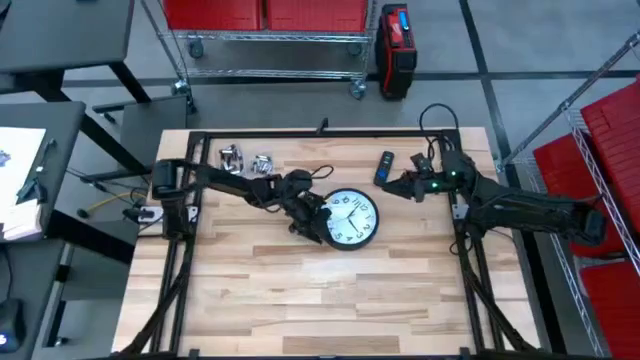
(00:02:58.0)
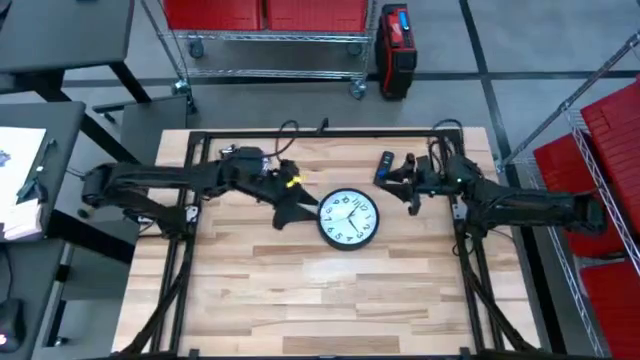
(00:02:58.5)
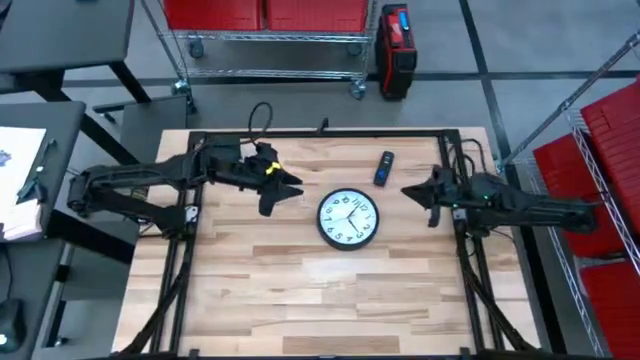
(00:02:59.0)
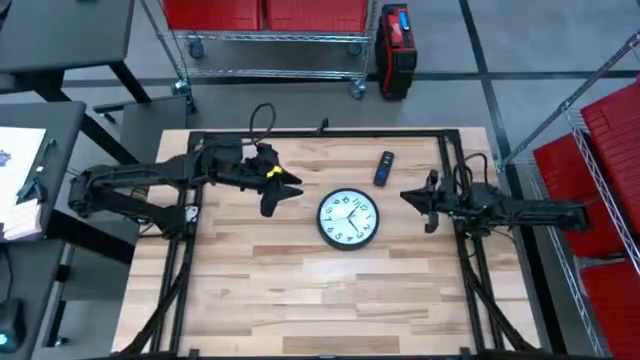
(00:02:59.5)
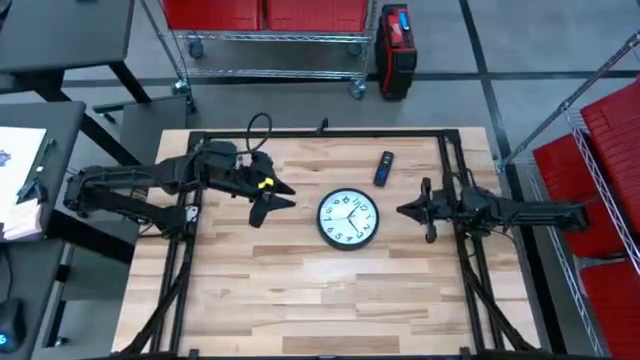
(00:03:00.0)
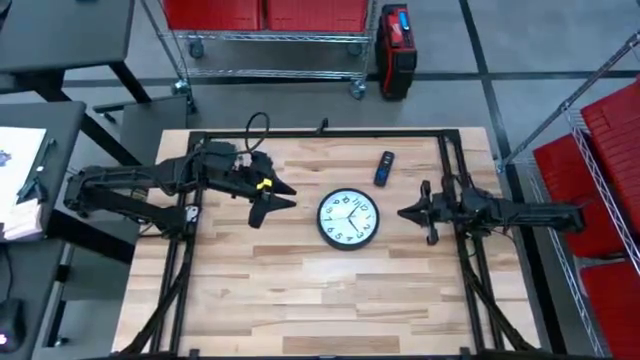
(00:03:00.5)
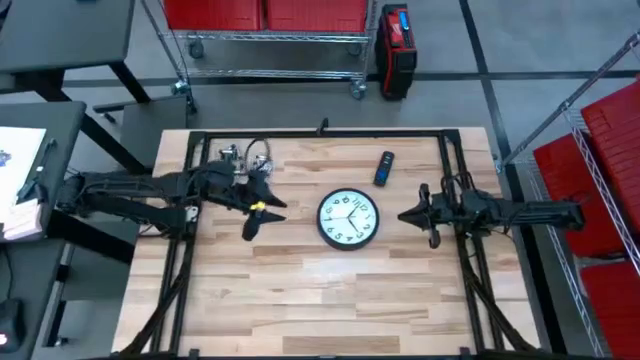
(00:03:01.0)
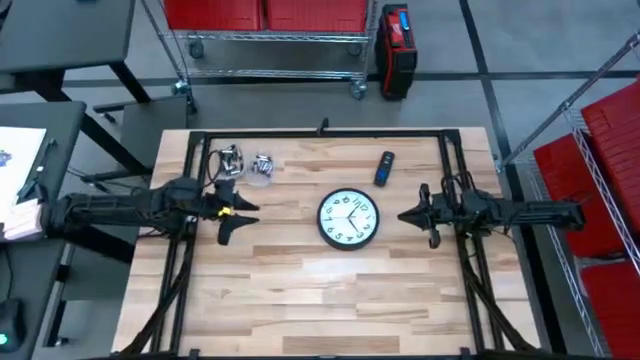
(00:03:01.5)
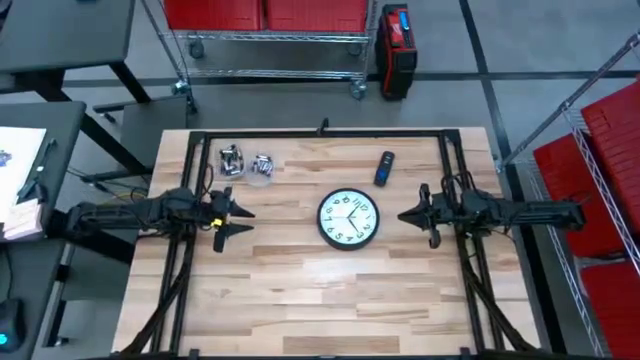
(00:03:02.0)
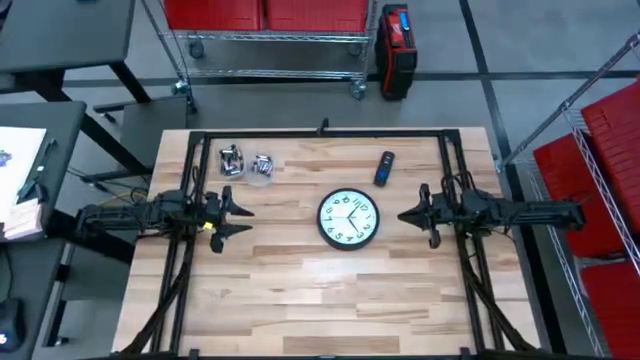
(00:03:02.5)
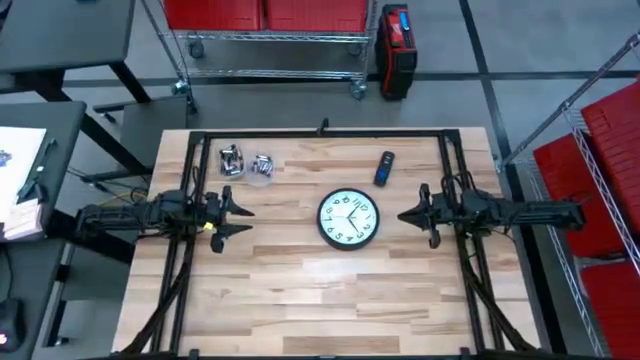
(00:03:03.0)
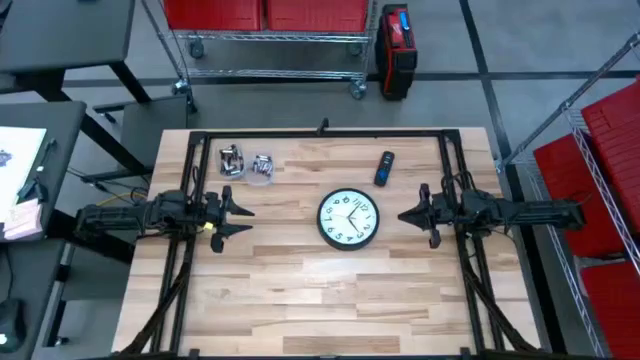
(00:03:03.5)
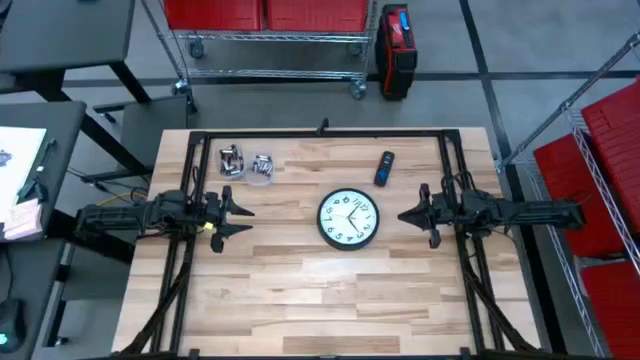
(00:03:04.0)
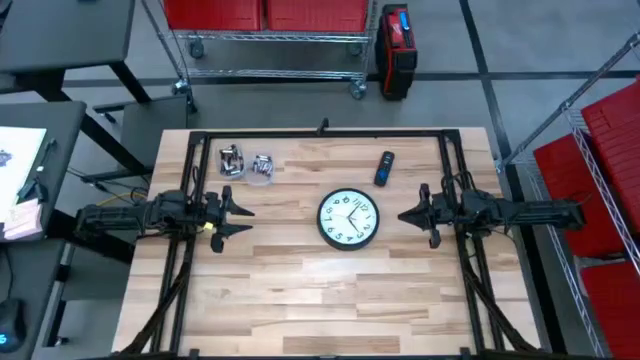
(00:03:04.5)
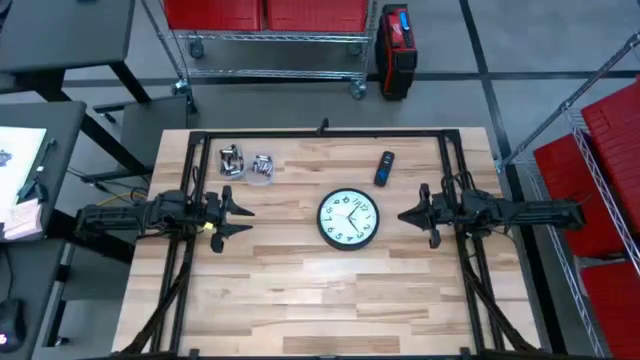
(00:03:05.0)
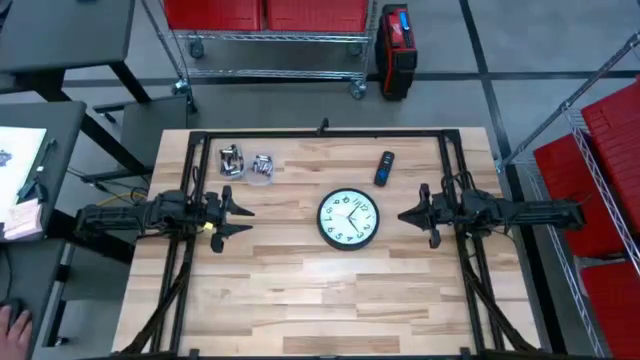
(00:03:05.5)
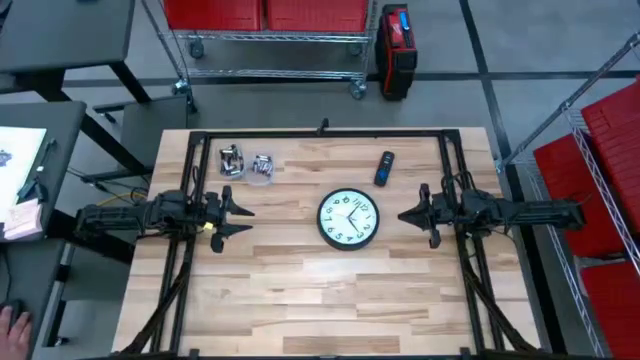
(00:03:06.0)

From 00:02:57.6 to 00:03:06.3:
Task: Insert battery
Return to Home Position

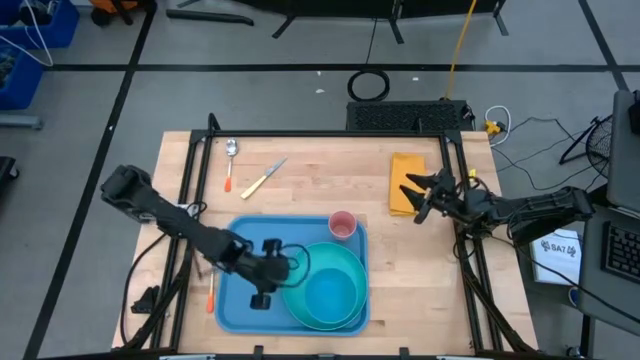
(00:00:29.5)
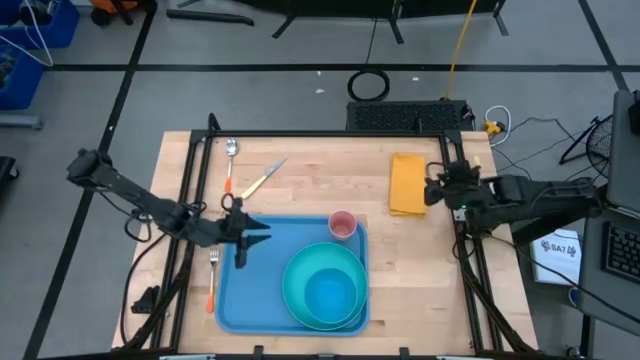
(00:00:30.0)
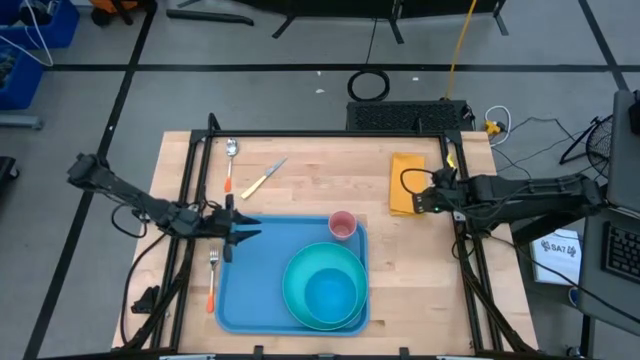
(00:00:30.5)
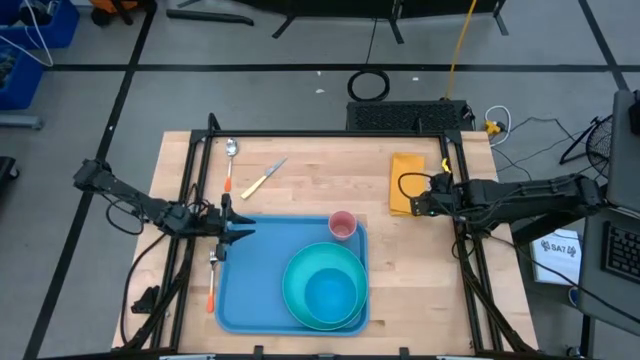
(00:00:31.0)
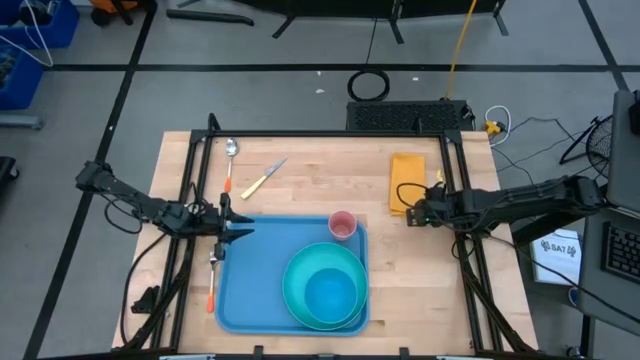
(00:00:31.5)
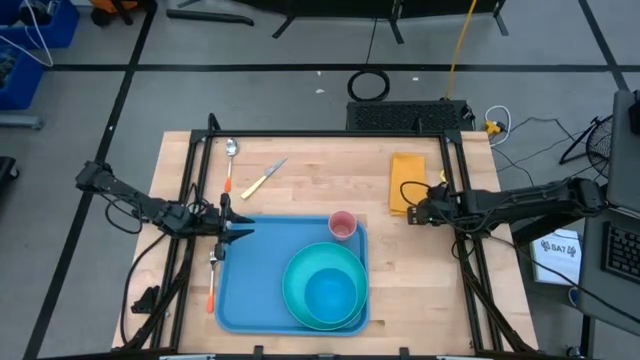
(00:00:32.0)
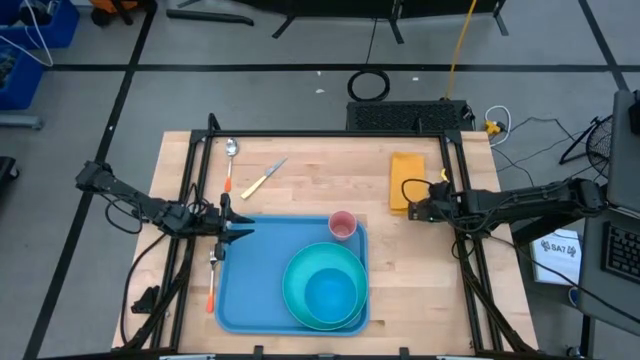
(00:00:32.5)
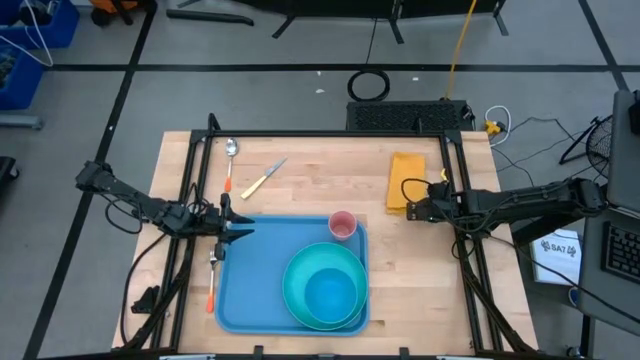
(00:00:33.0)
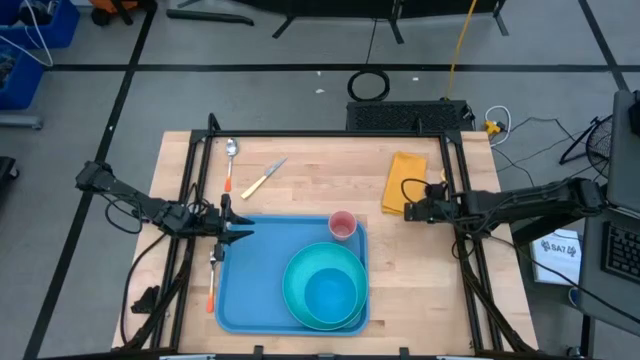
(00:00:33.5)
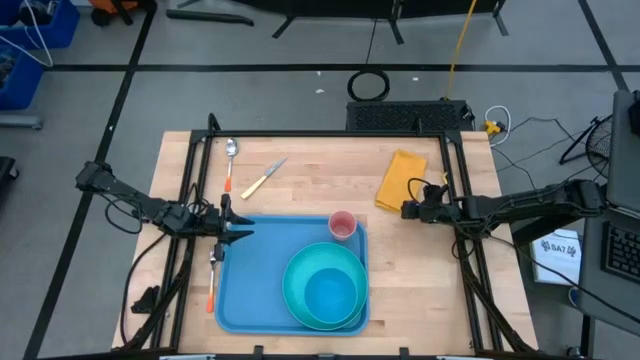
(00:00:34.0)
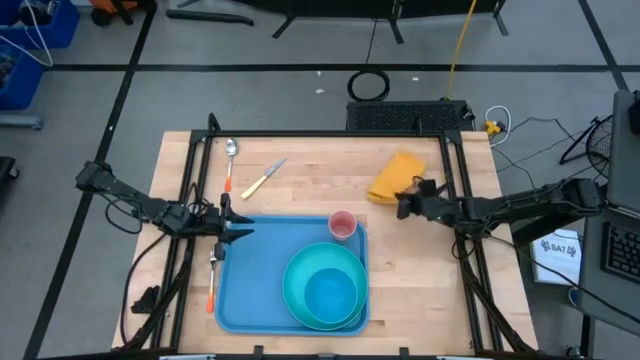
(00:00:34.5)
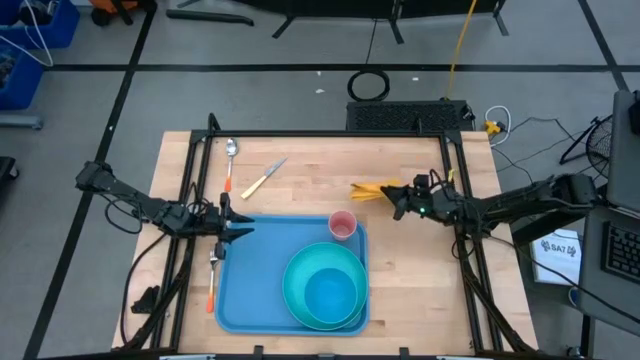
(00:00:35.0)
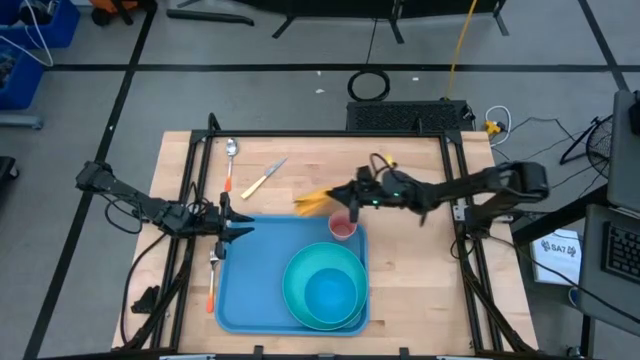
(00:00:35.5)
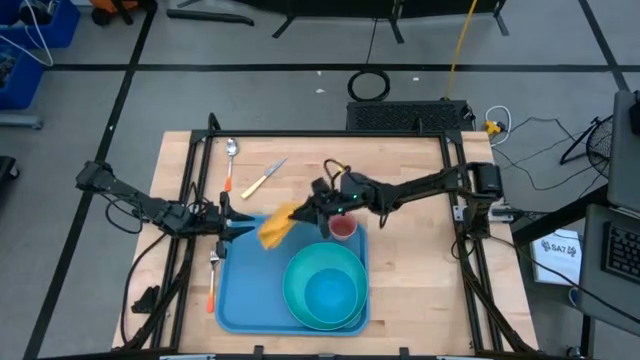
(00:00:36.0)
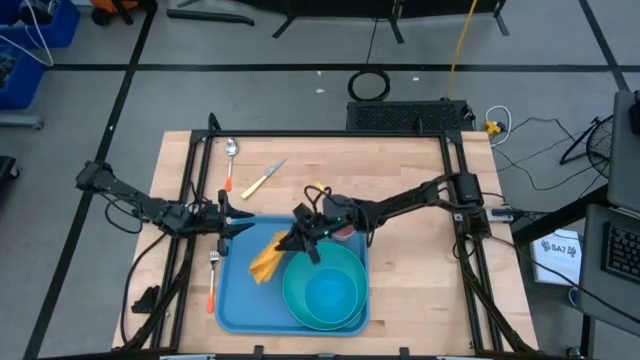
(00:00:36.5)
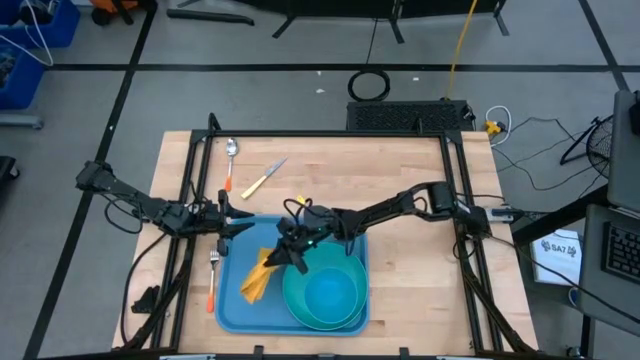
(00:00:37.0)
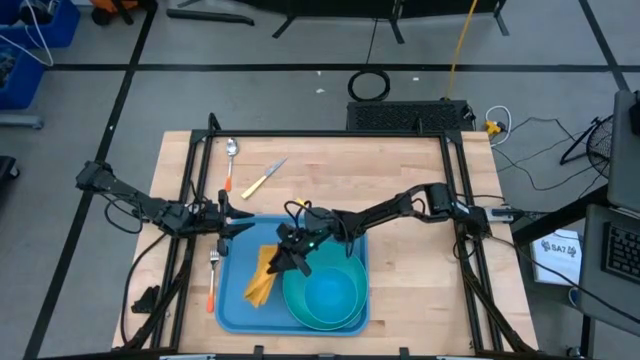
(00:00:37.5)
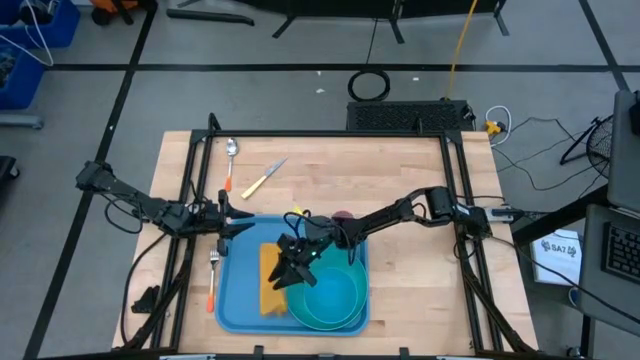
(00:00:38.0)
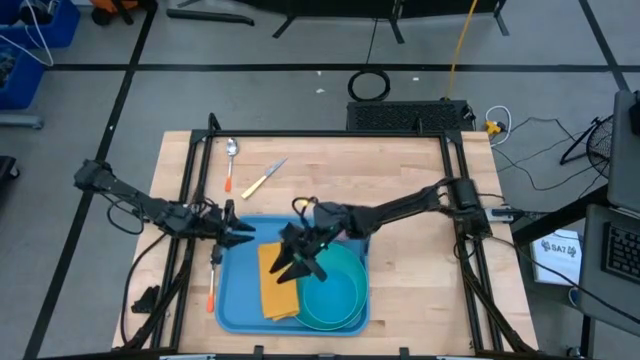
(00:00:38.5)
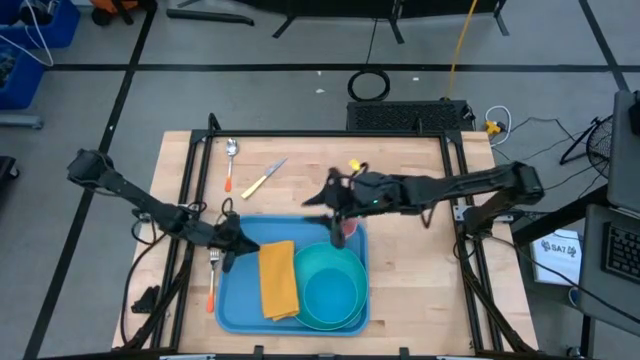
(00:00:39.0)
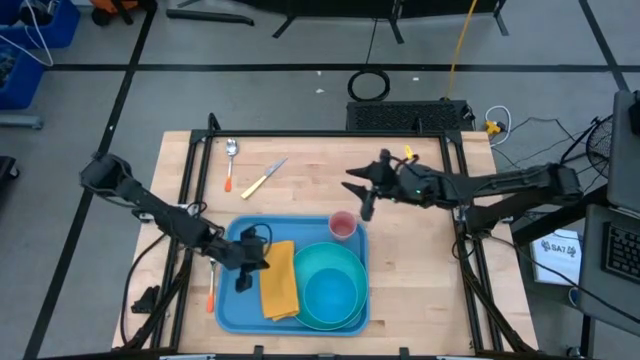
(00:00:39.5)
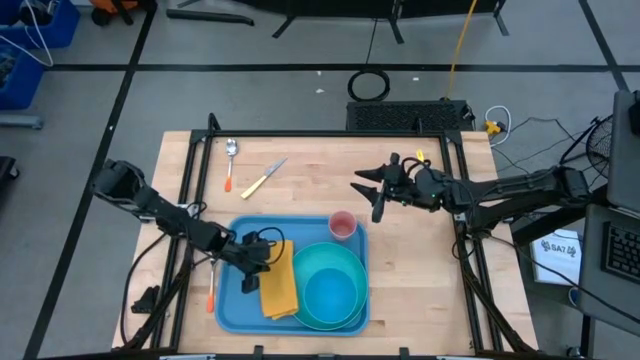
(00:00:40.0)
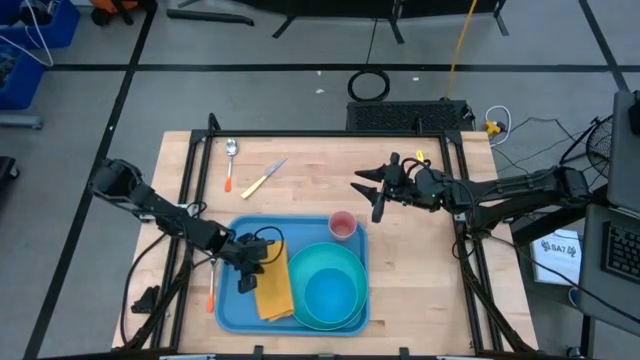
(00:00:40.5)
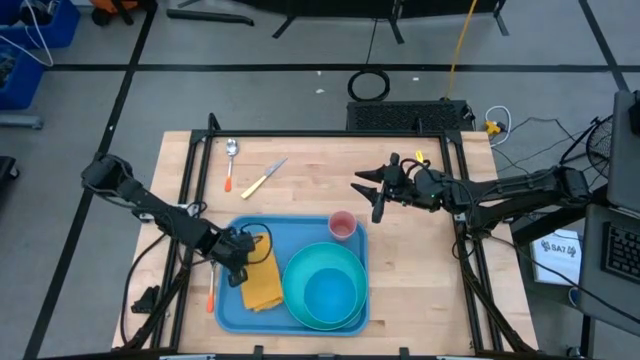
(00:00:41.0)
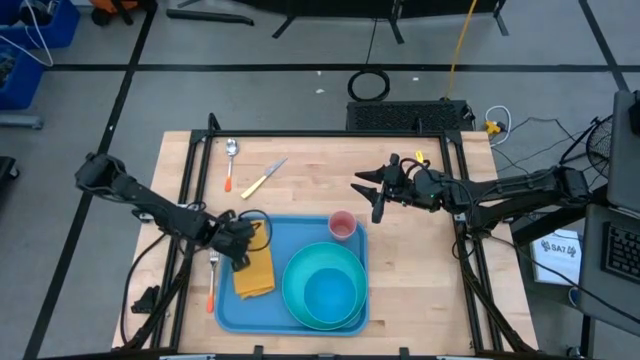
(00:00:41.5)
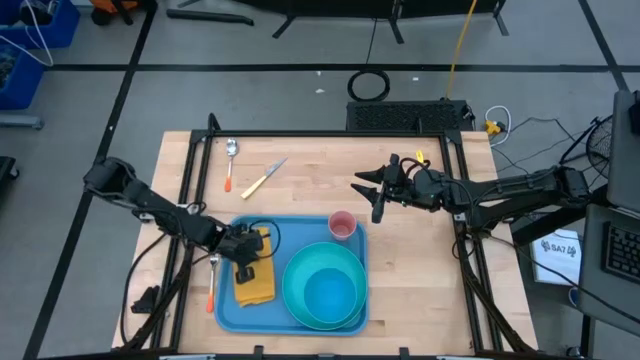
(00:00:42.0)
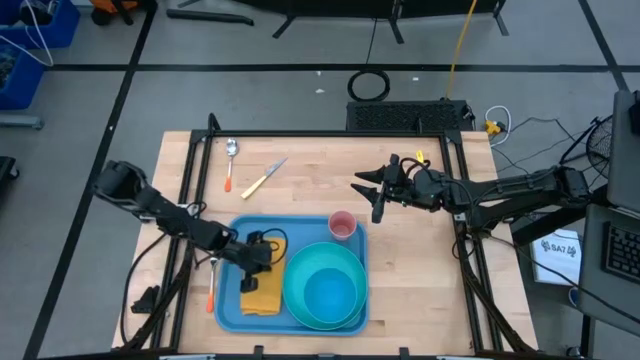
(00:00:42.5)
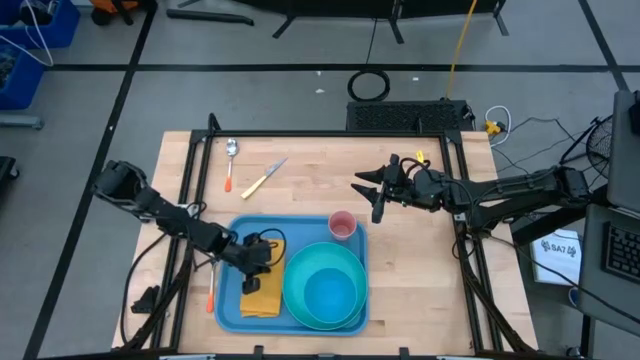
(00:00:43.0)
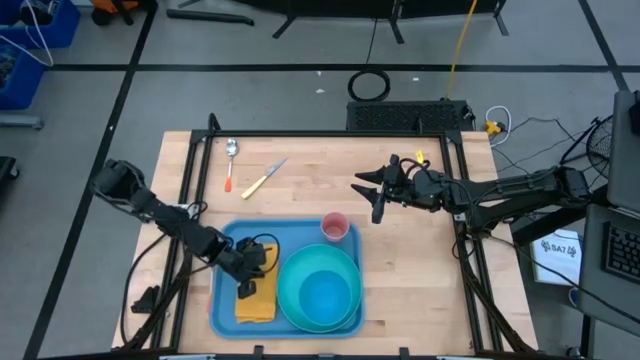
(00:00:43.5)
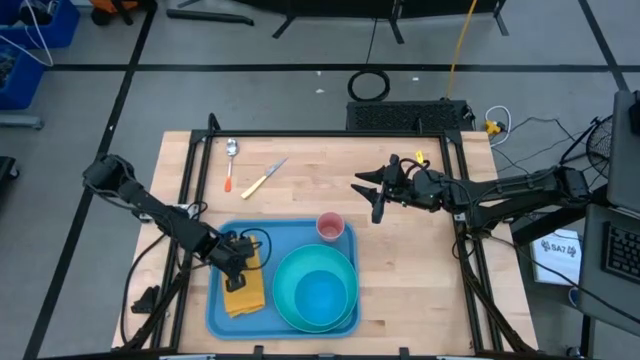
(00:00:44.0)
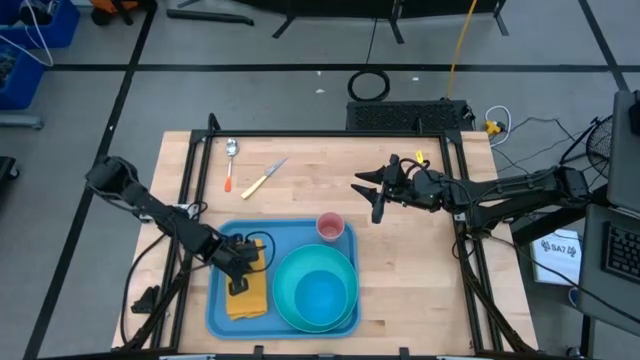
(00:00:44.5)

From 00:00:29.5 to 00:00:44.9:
Task: Set up tray
Put the yellow napkin on the blue serving tray to the left of the light green plate
